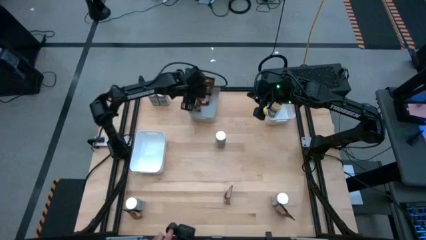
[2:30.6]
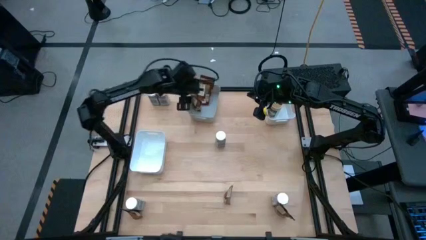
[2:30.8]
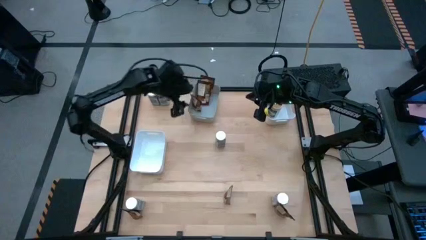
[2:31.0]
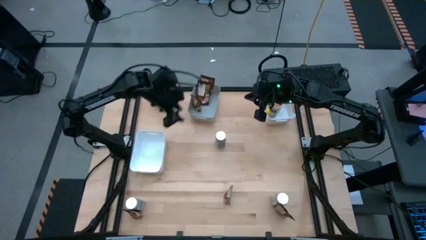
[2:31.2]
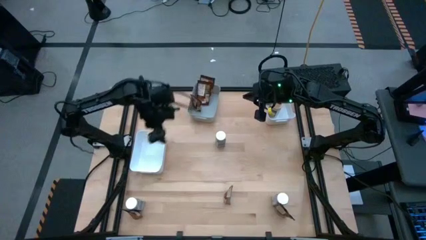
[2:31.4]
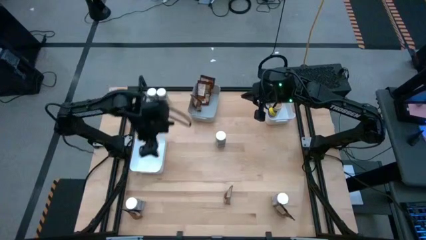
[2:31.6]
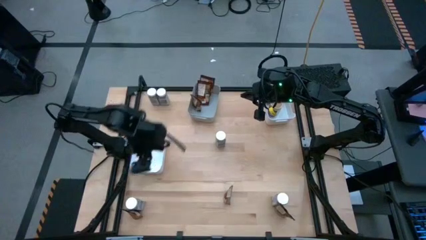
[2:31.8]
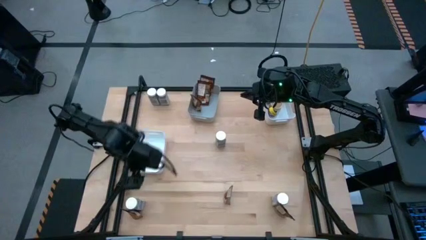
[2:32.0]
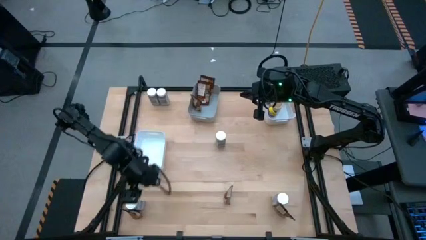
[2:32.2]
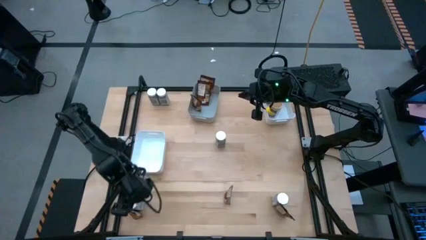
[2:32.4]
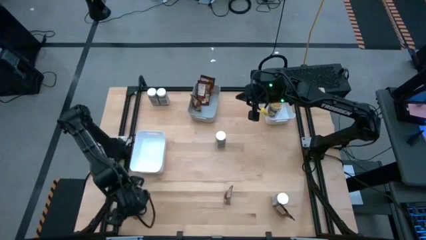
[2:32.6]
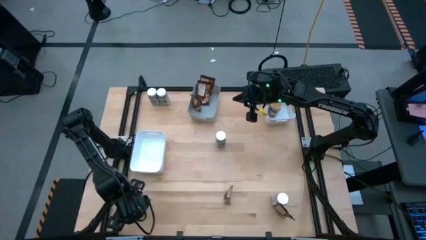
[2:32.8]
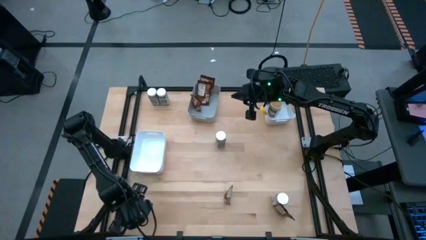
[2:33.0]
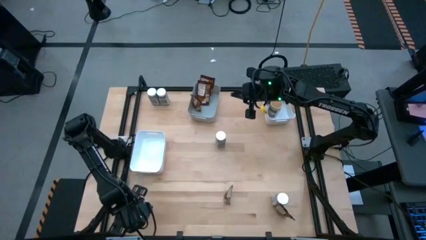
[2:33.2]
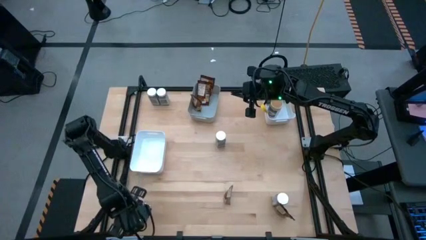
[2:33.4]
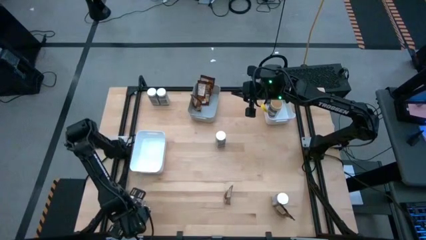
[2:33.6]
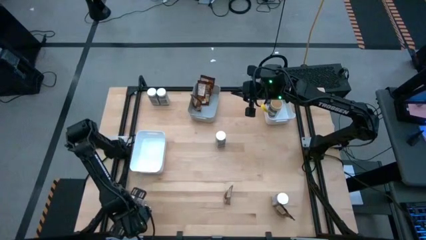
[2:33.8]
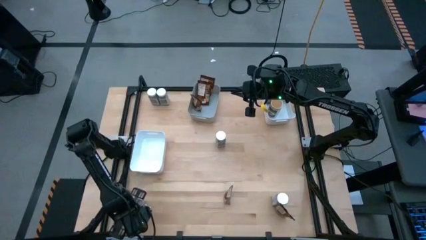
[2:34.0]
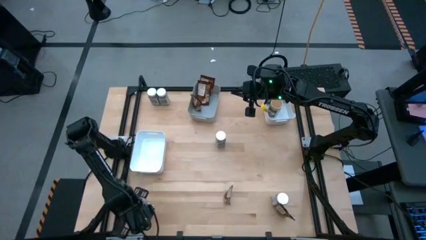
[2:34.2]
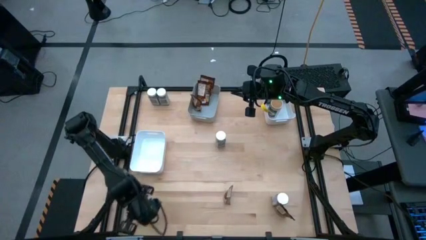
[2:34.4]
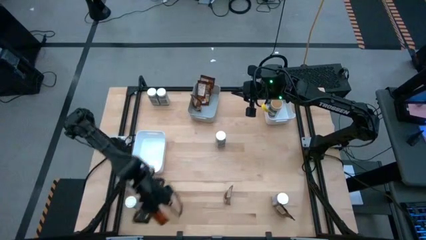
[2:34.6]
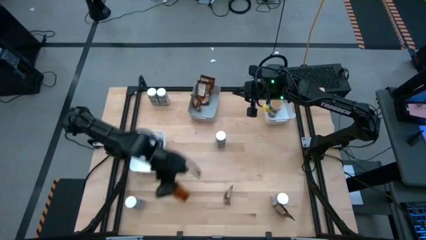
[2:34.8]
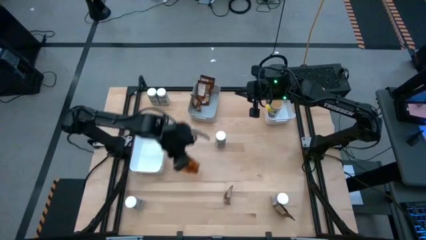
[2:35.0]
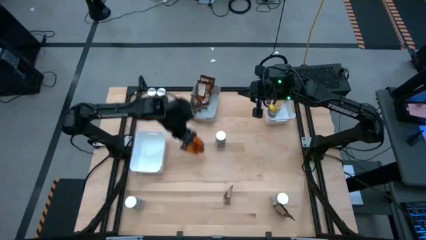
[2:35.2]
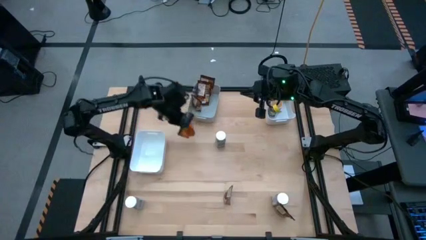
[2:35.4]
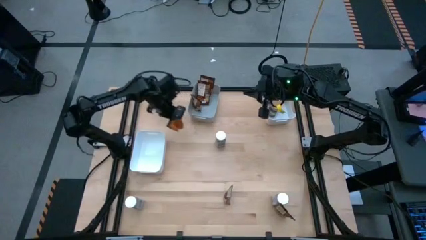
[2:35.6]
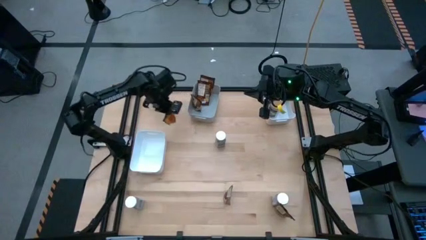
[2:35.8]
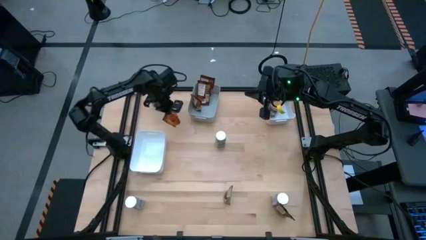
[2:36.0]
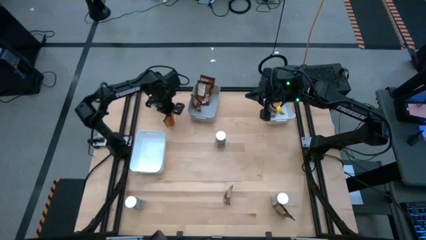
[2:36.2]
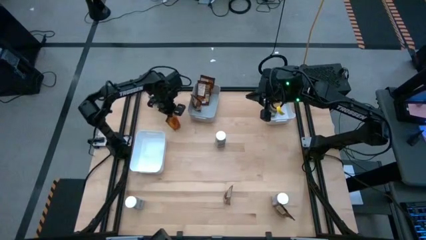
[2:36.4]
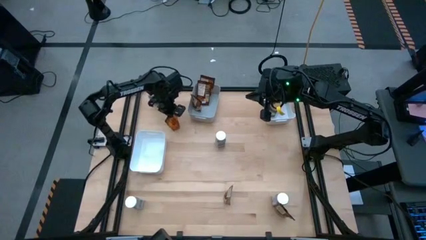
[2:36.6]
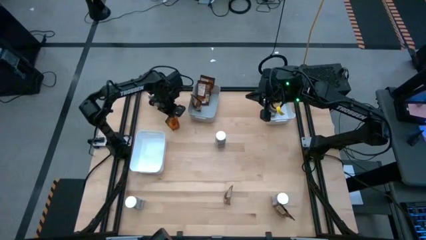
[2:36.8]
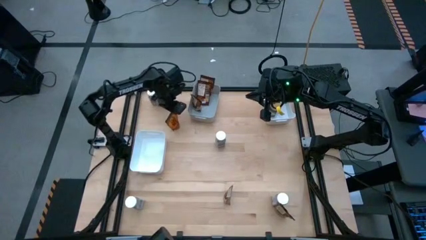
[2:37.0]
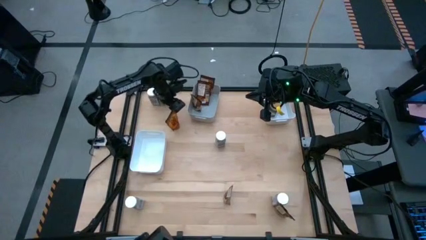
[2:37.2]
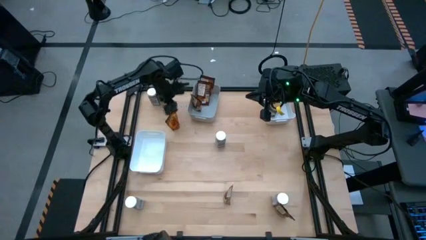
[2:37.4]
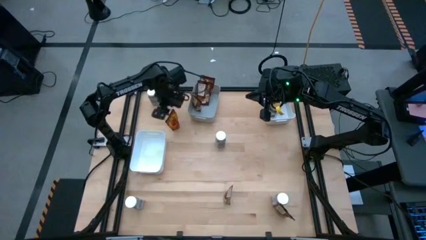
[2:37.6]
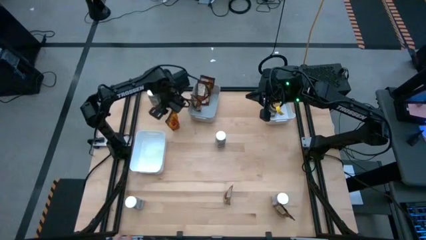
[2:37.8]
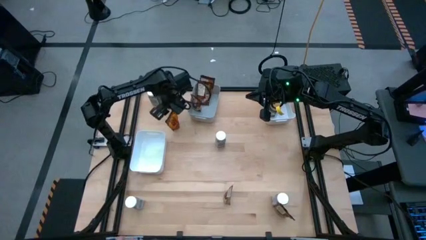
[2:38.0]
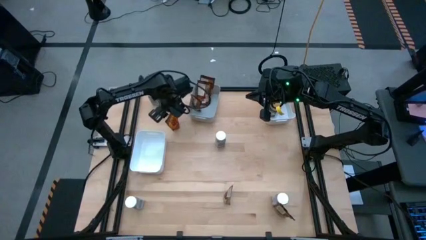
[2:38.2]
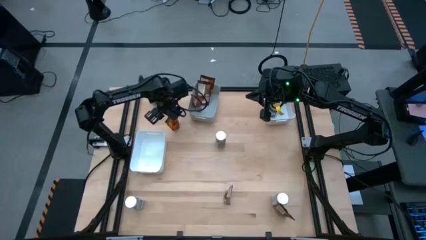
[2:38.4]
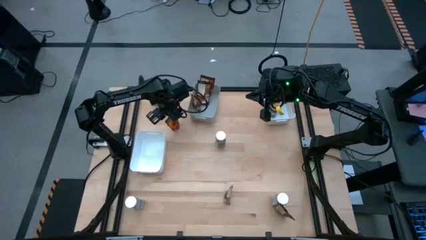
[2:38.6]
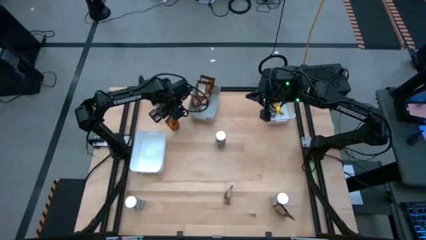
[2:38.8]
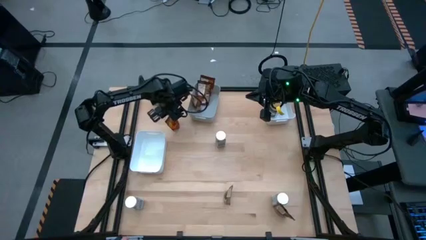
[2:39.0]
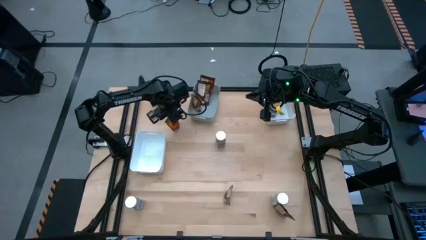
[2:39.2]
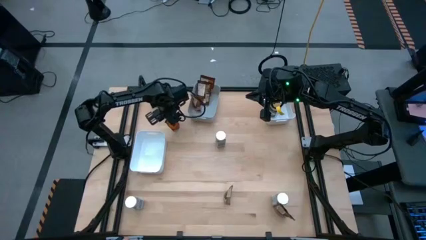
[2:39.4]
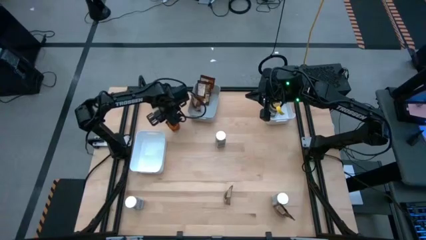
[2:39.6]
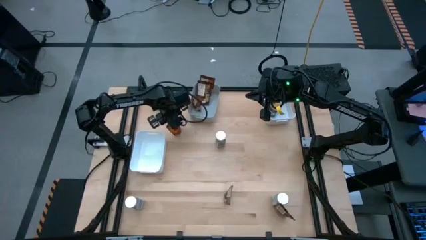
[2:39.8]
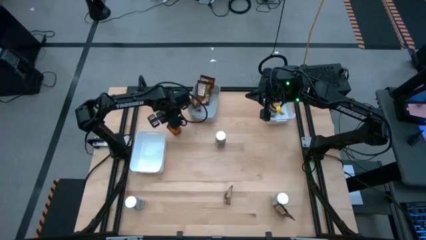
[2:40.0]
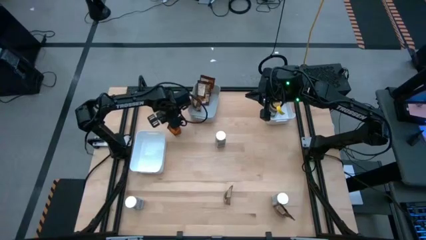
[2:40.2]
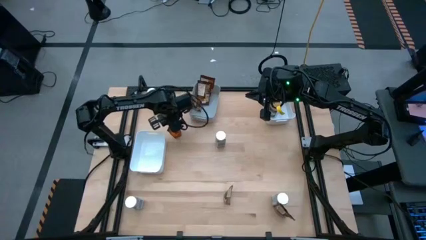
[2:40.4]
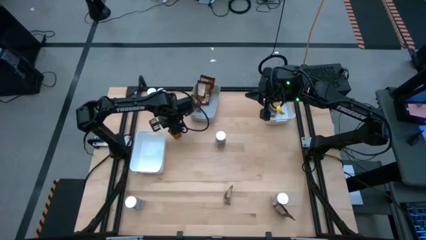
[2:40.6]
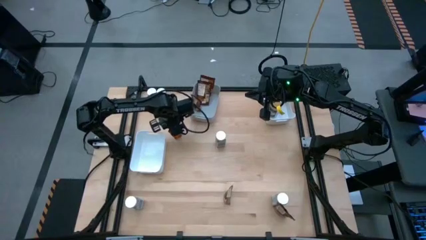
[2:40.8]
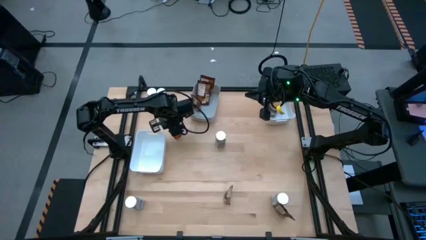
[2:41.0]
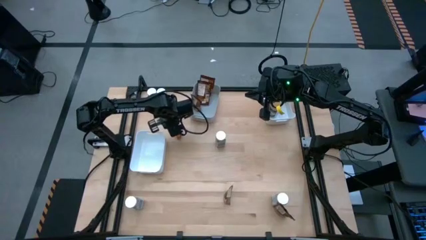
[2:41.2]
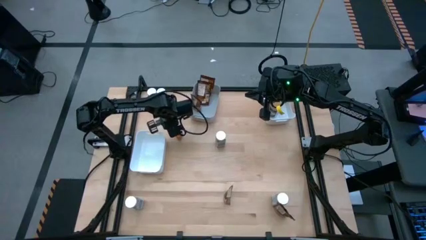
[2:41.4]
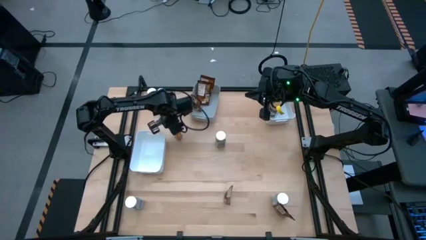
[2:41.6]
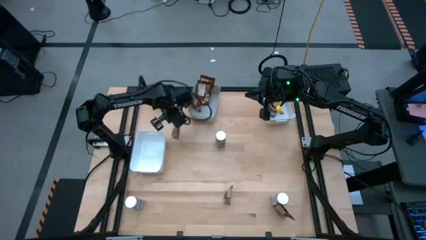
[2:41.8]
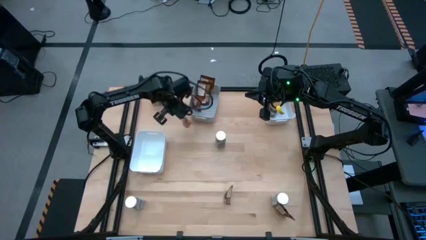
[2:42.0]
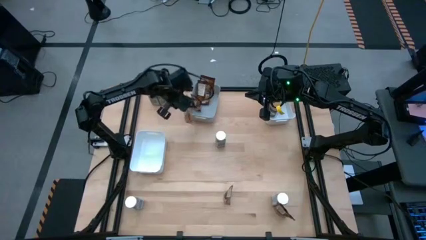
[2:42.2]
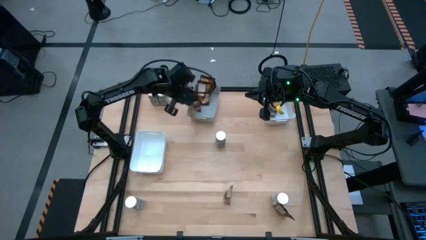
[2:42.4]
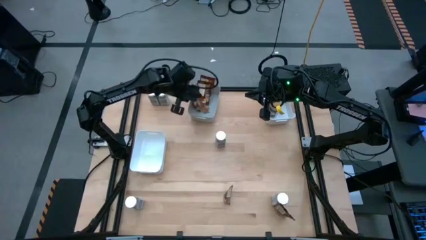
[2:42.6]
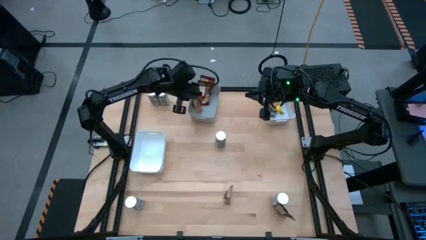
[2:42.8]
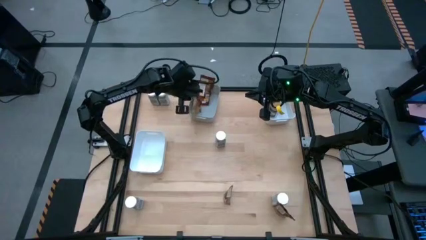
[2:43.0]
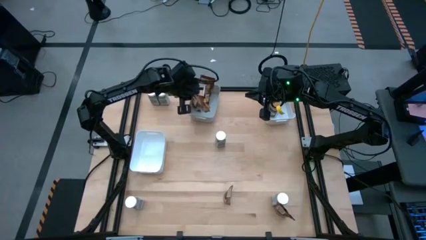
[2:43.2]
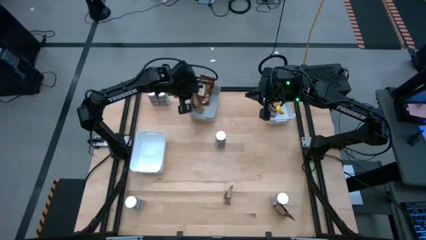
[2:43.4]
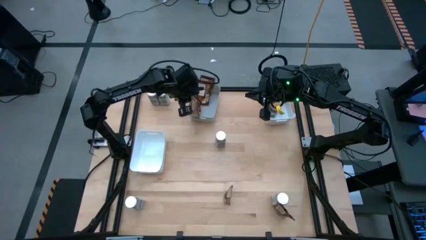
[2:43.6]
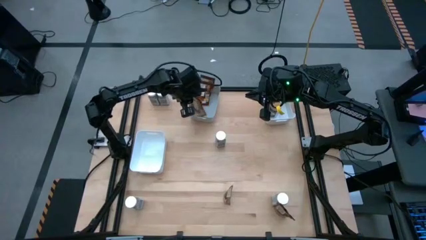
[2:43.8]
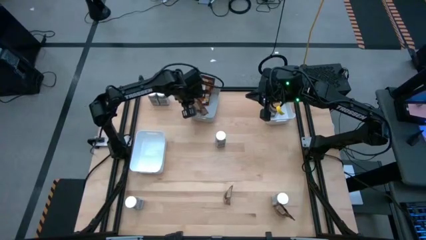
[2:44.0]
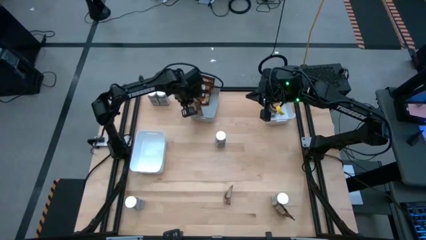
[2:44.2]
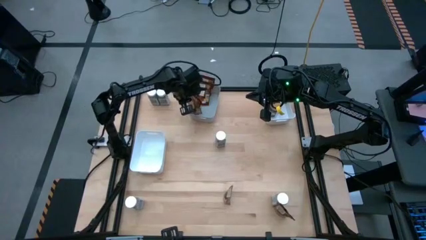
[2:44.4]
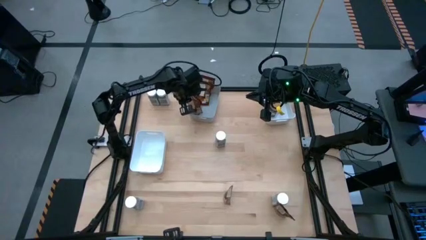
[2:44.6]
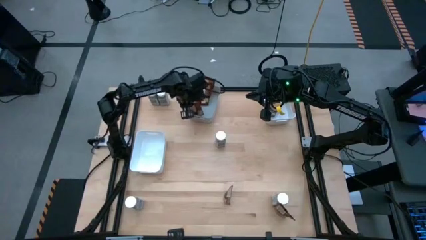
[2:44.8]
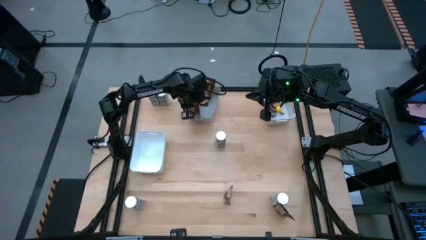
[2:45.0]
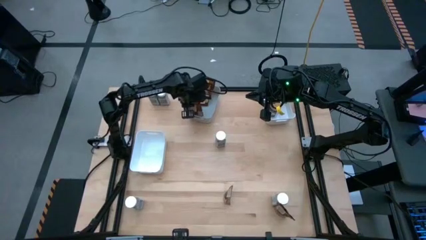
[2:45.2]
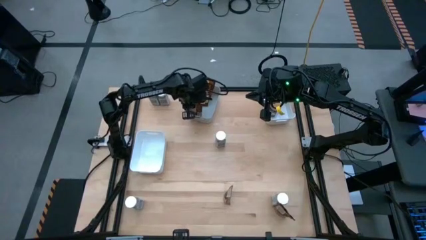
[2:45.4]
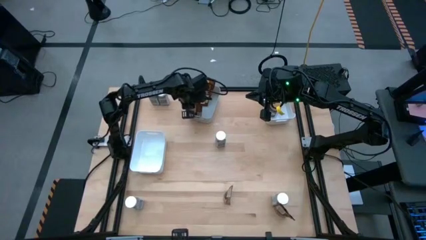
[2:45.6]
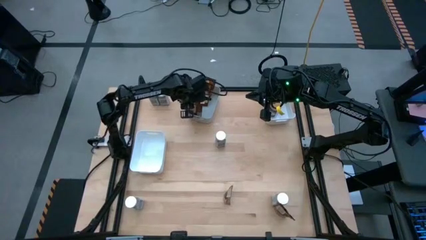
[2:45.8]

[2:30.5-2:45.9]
Task: Sort spices by type
Put the orange spice pack into the gray bin
